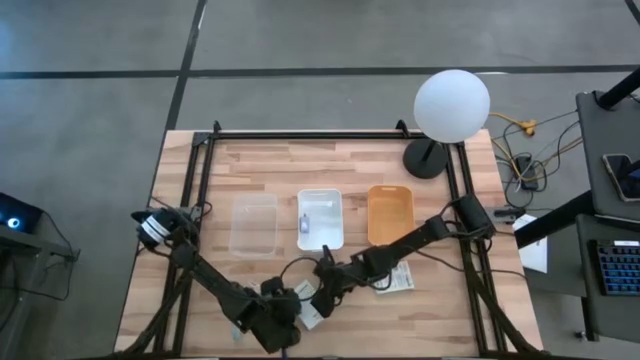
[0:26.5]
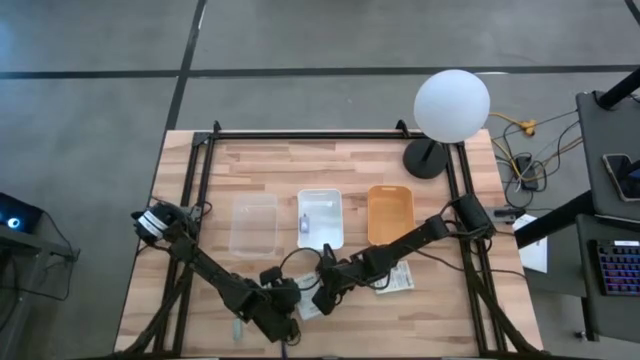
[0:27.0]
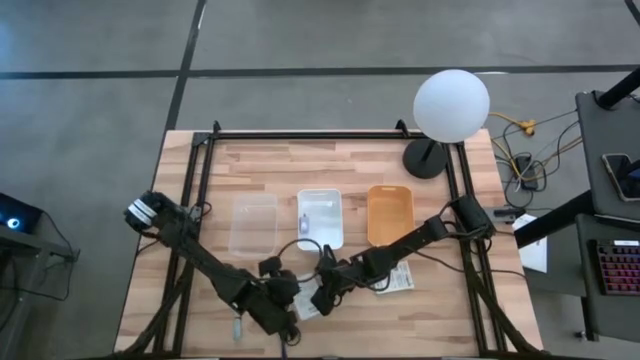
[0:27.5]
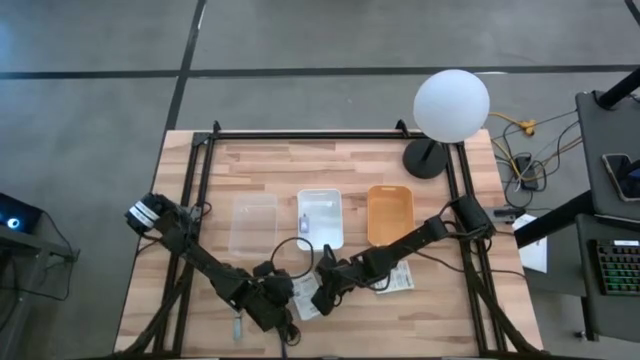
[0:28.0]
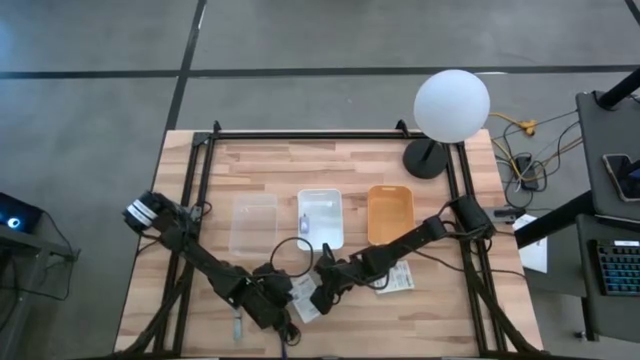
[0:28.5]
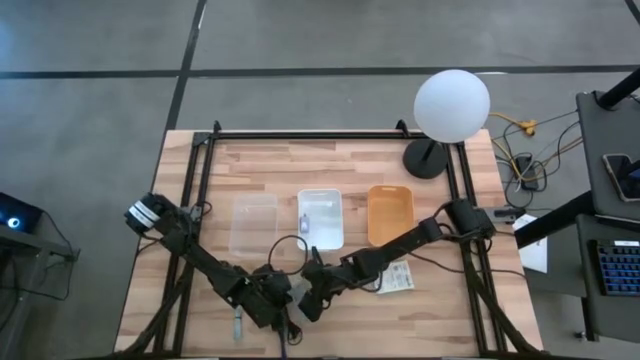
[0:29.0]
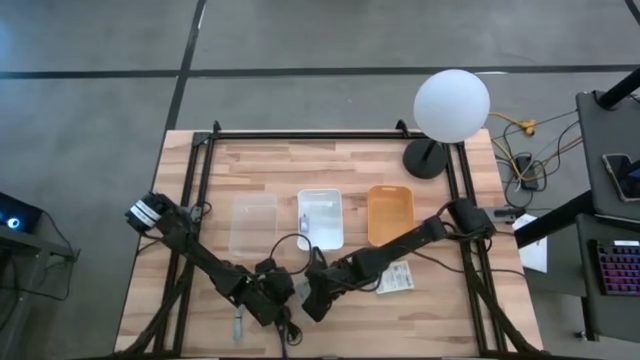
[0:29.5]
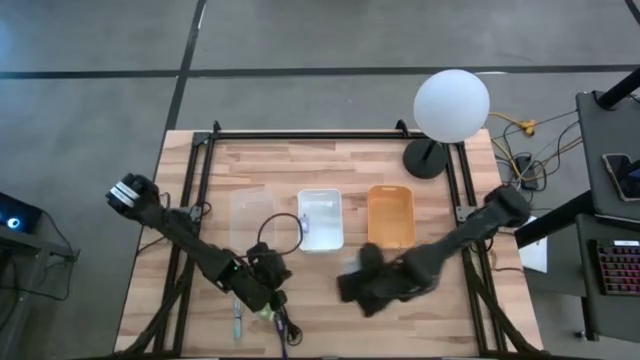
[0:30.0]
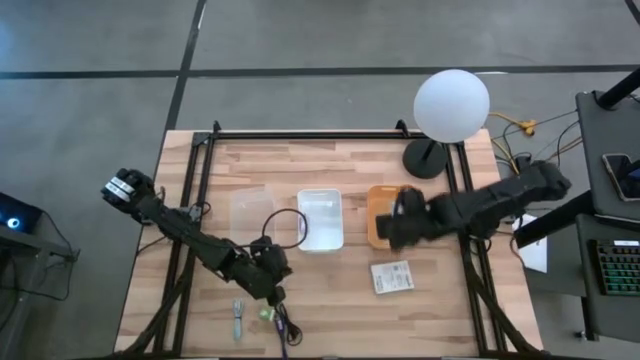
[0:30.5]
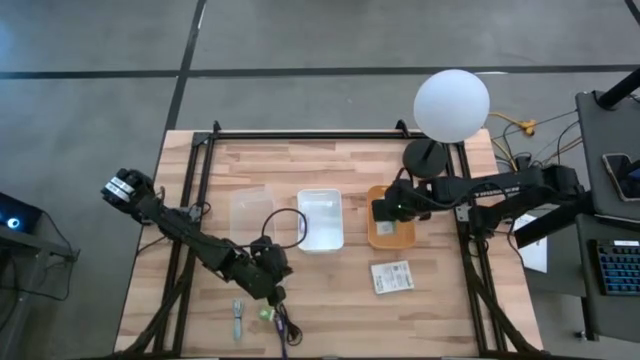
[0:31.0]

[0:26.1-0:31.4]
Task: Pick and place items into bin
Put the left white card reader box into the orange bin

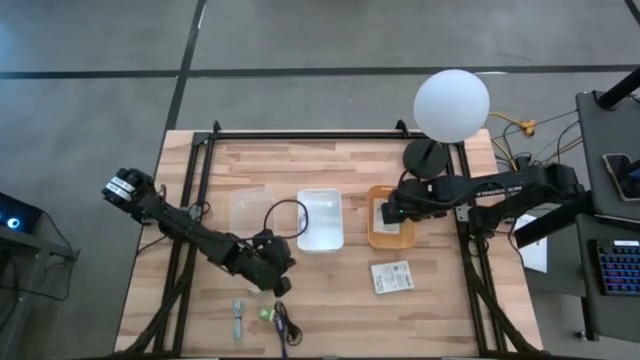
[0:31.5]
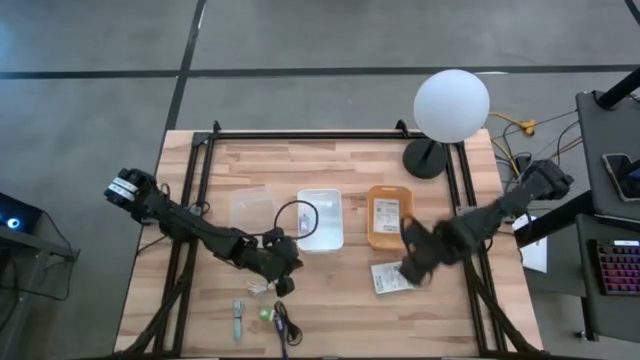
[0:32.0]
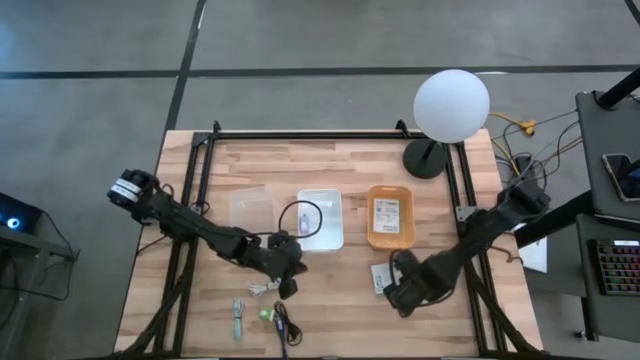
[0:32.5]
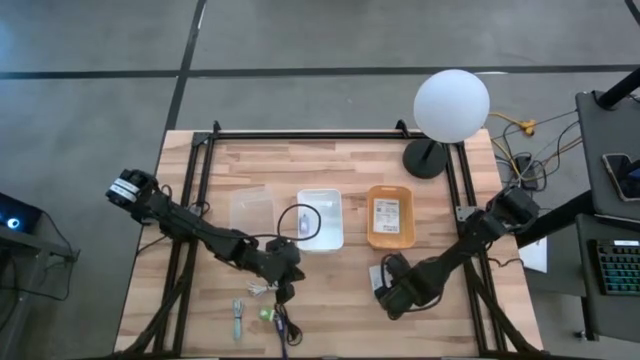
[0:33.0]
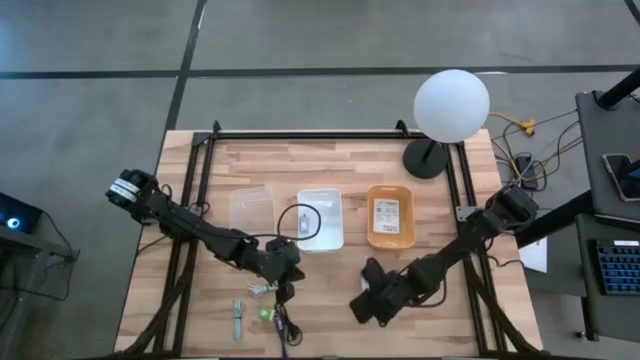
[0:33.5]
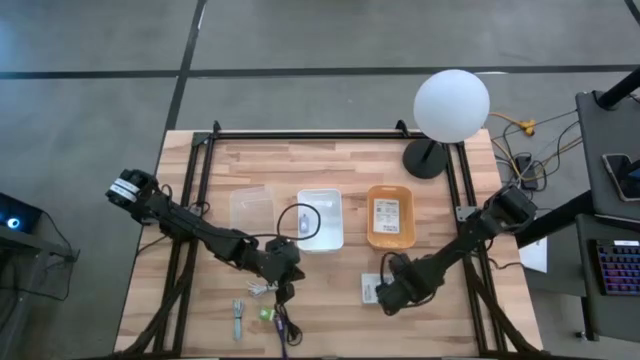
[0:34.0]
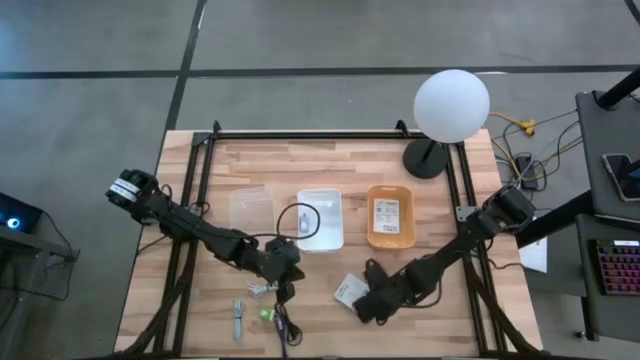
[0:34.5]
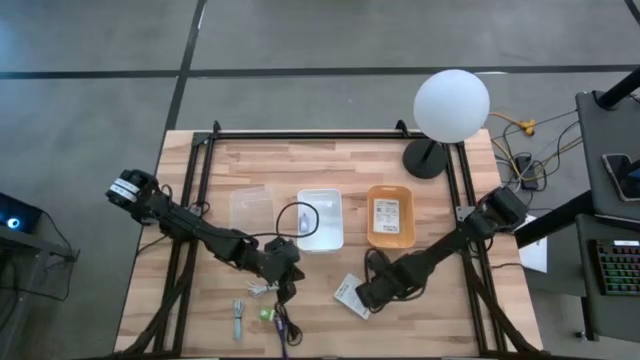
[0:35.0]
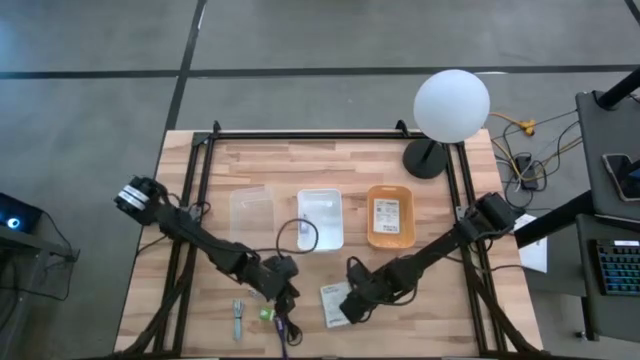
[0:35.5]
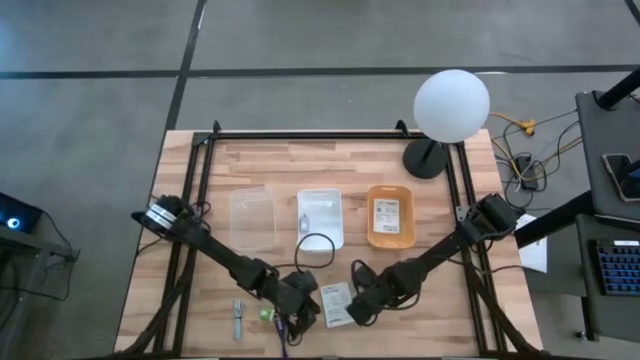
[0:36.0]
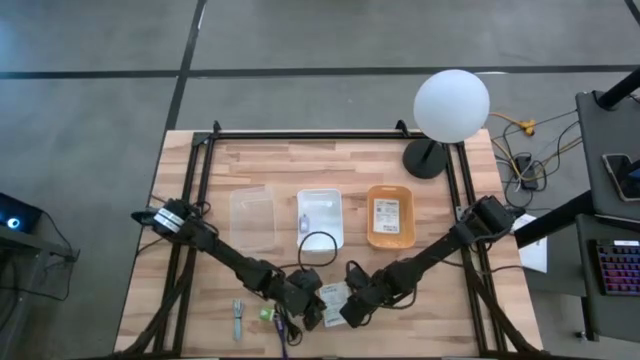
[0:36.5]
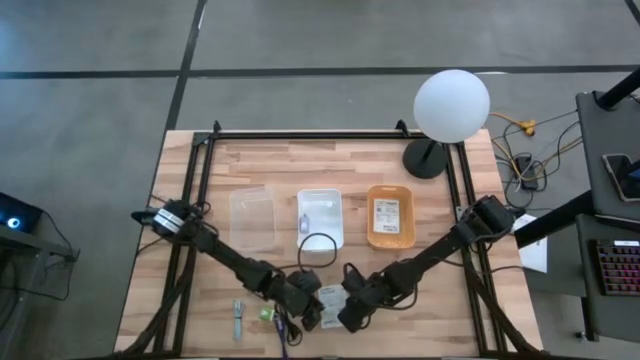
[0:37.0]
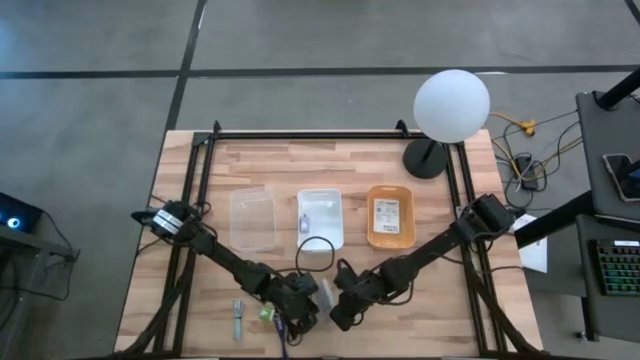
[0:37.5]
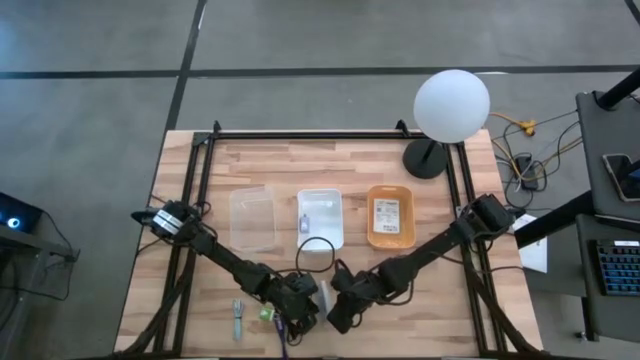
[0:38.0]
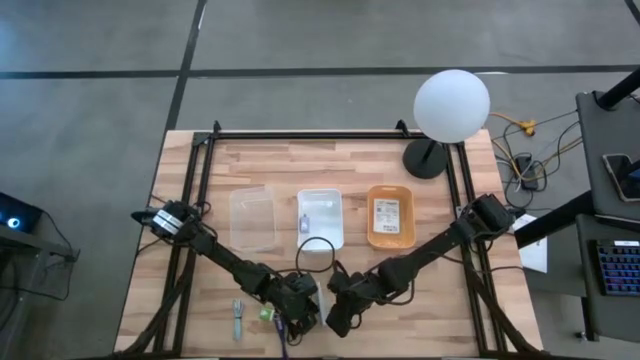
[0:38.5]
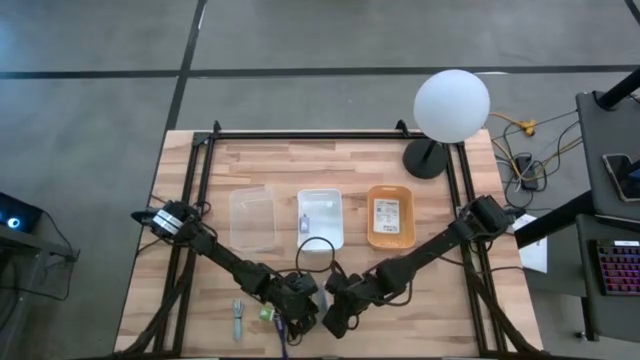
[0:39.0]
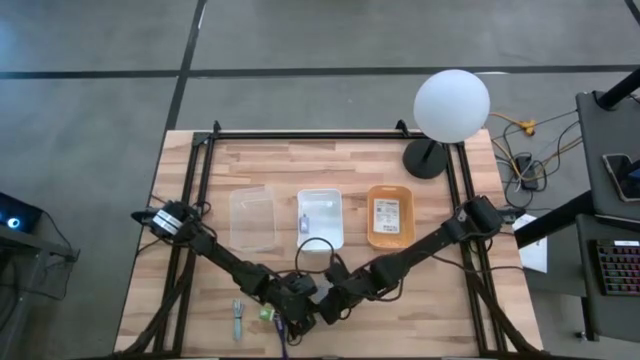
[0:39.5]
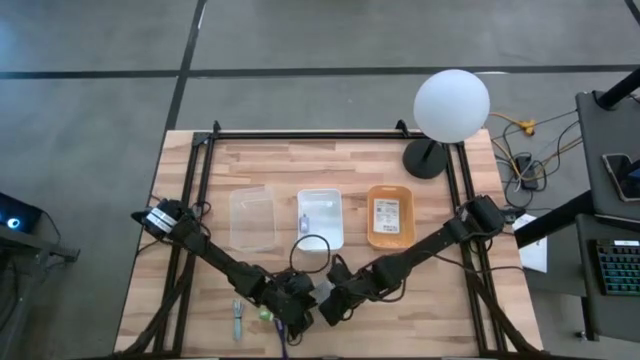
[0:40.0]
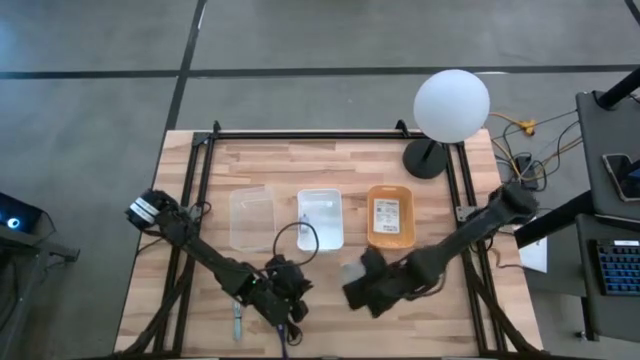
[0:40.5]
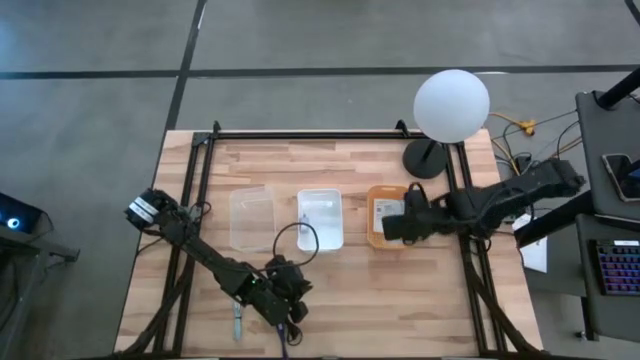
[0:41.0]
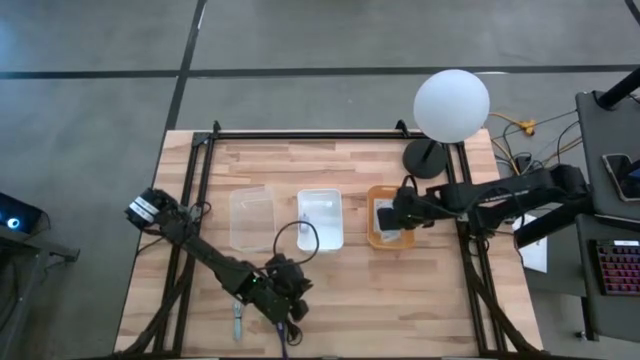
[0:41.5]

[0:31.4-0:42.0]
Put the white card reader box into the orange bin

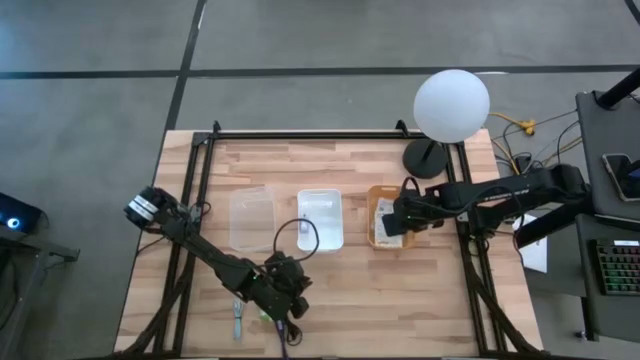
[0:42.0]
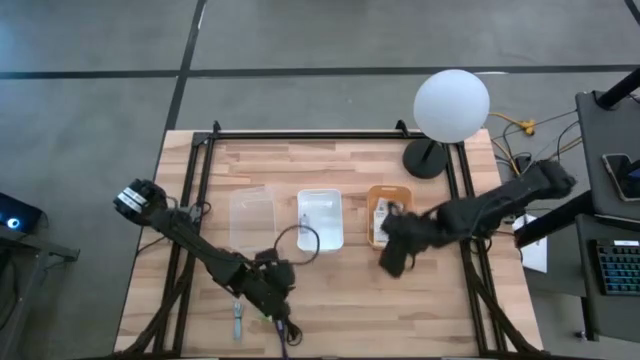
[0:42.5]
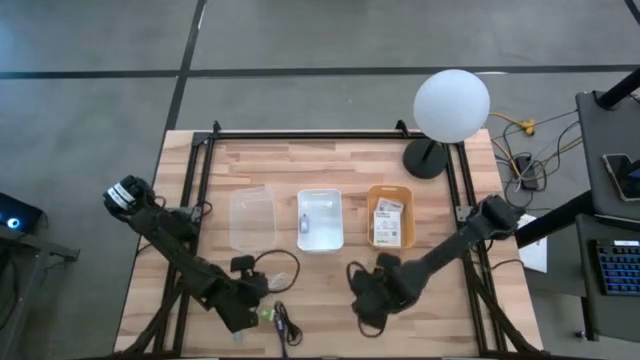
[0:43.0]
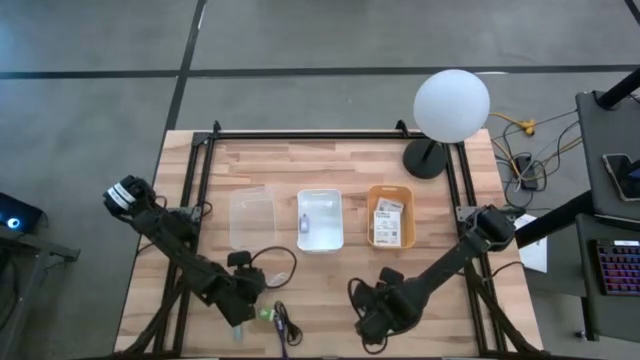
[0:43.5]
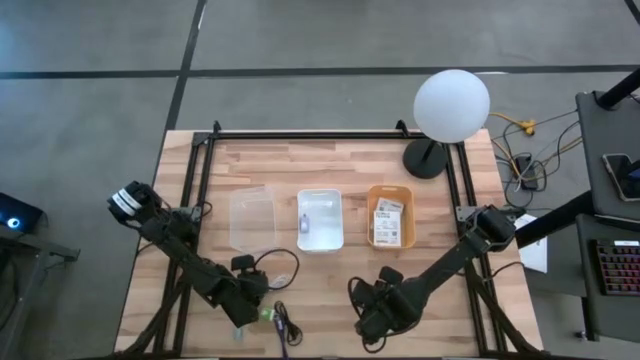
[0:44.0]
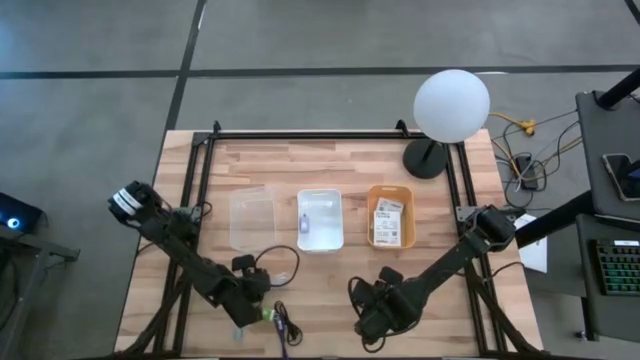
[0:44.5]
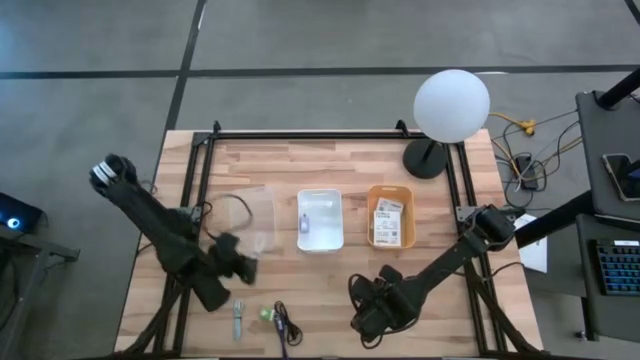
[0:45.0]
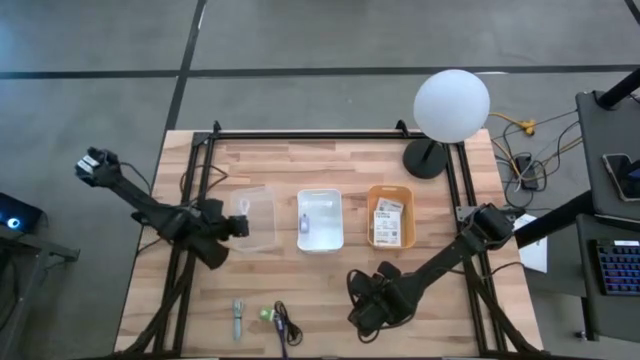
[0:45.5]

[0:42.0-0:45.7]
Put the white charger cable into the transparent bin

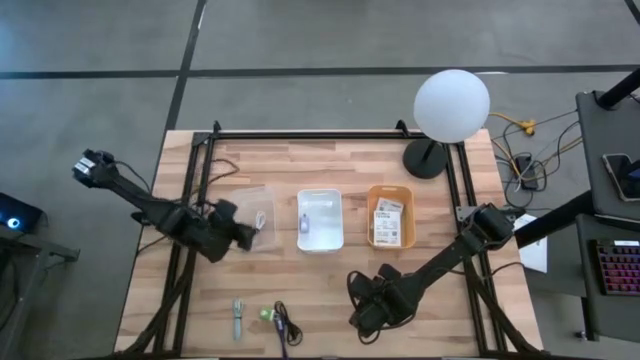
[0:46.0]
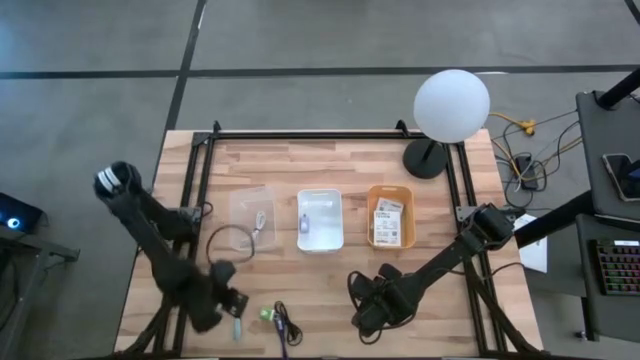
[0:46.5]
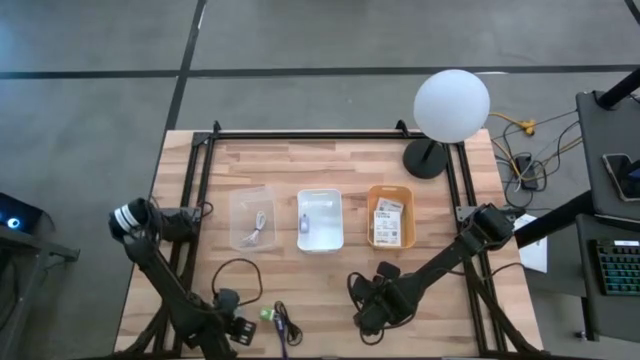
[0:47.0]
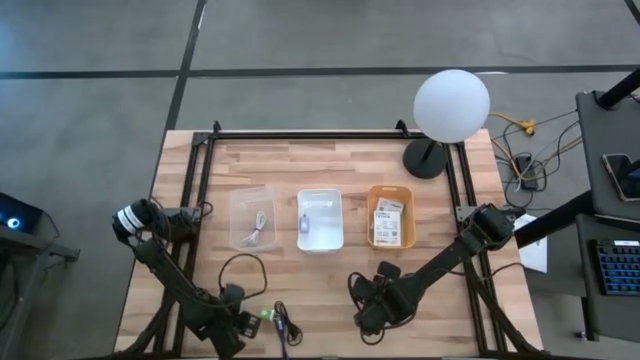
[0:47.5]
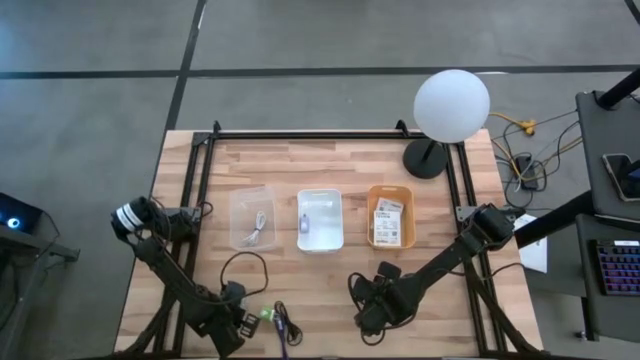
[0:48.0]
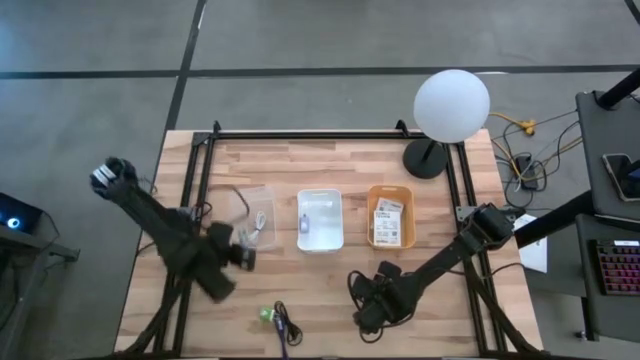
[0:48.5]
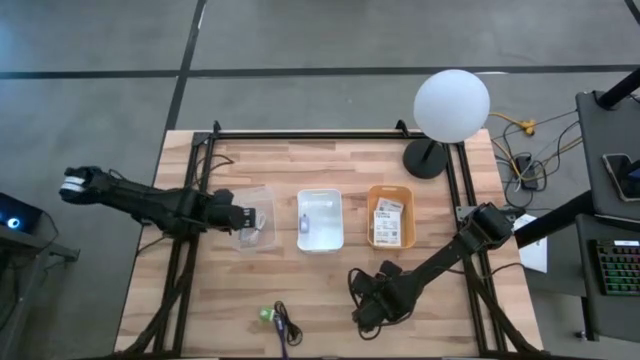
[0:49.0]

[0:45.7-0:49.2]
Put the light blue charger cable into the transparent bin
